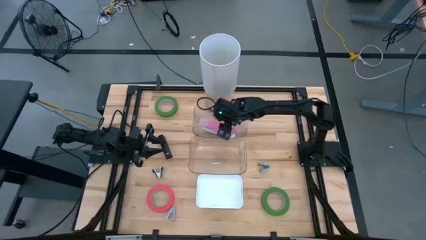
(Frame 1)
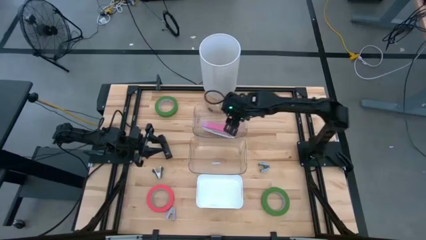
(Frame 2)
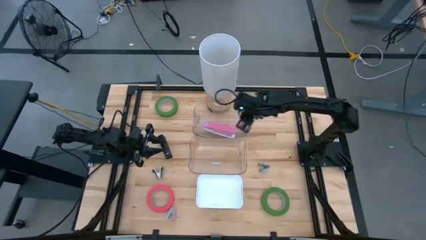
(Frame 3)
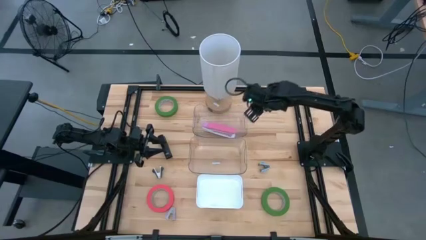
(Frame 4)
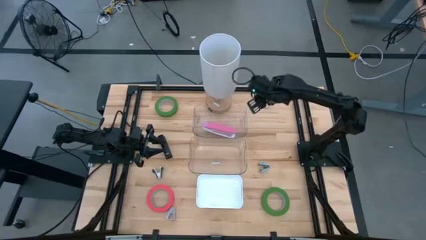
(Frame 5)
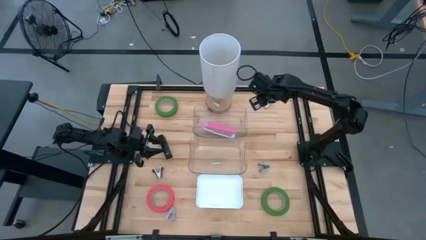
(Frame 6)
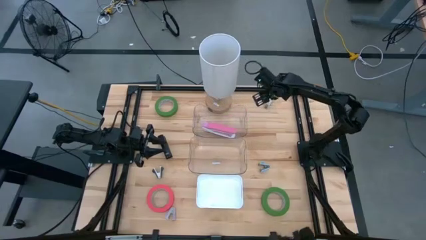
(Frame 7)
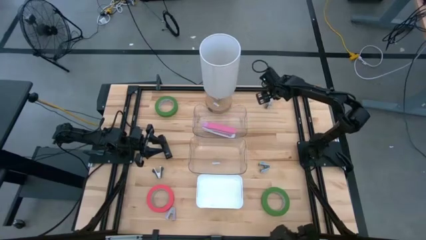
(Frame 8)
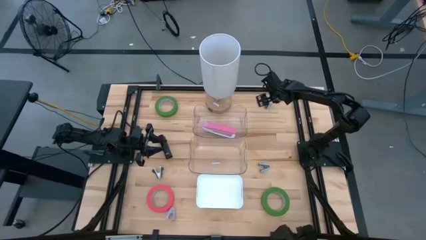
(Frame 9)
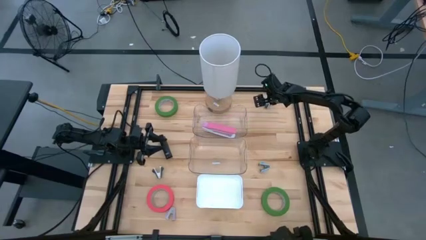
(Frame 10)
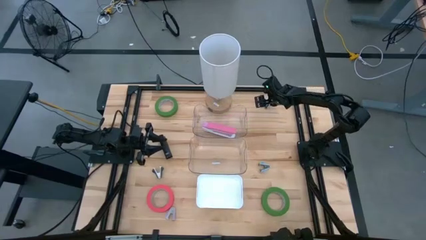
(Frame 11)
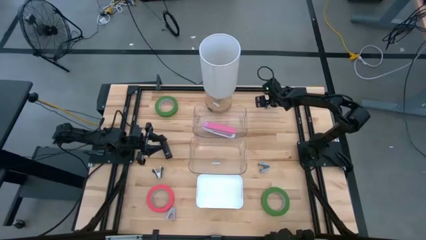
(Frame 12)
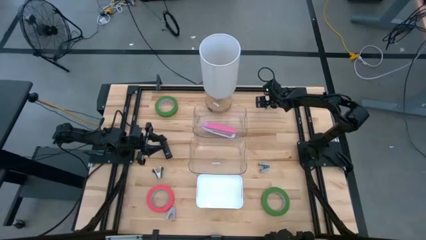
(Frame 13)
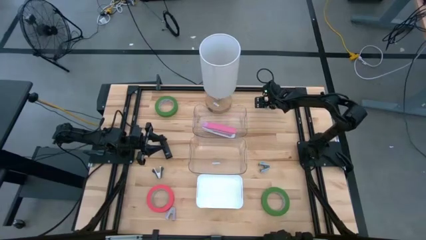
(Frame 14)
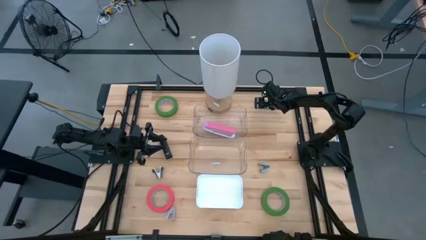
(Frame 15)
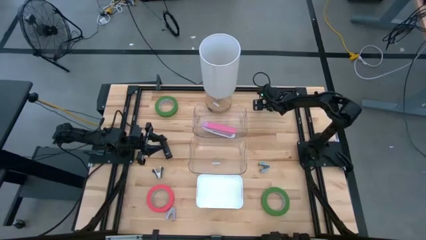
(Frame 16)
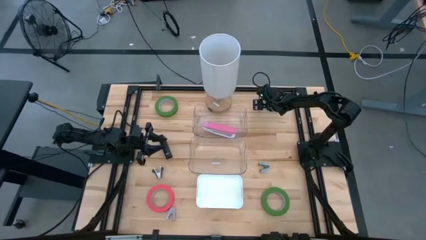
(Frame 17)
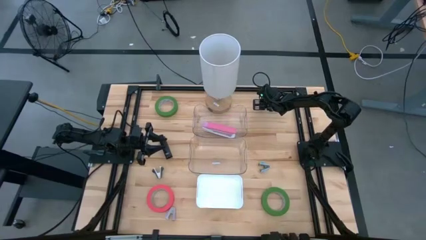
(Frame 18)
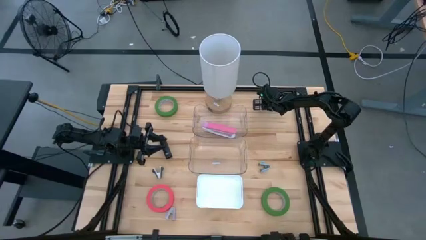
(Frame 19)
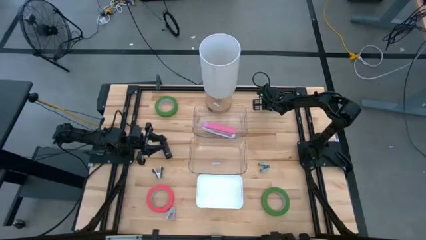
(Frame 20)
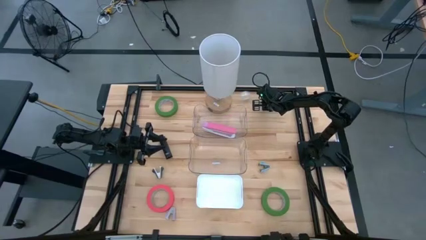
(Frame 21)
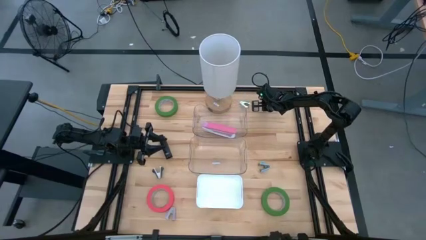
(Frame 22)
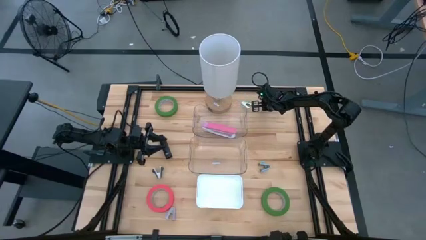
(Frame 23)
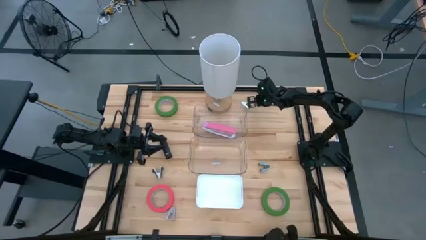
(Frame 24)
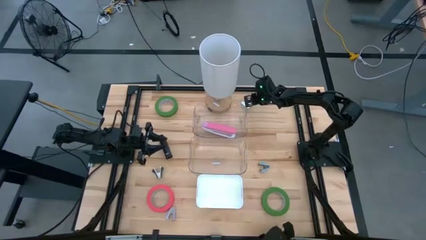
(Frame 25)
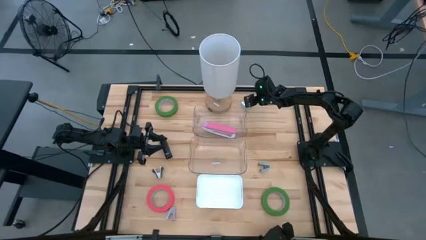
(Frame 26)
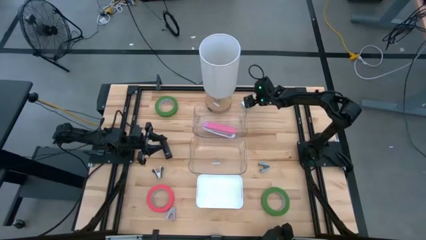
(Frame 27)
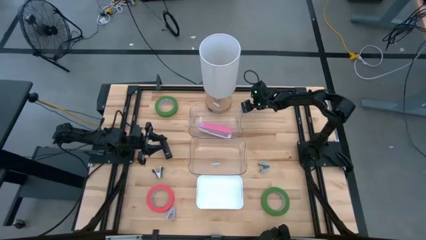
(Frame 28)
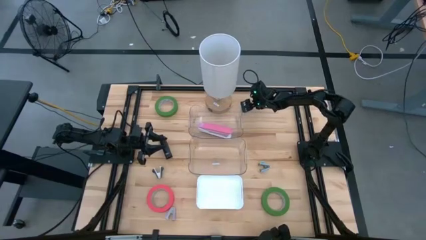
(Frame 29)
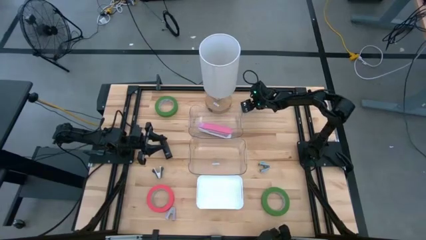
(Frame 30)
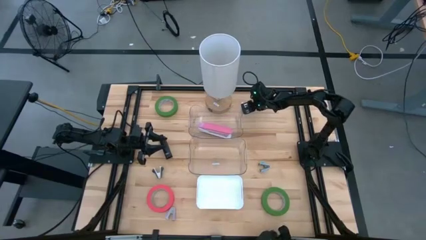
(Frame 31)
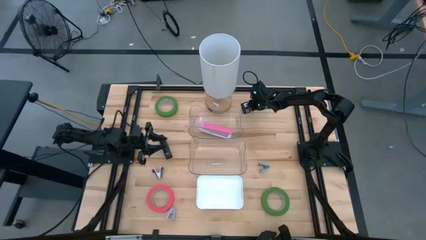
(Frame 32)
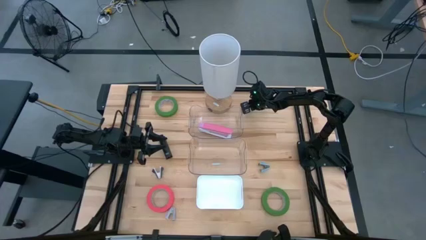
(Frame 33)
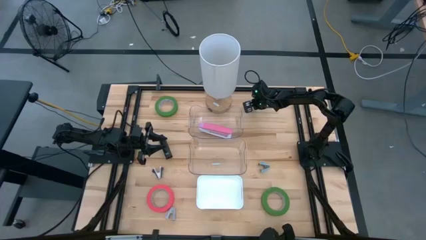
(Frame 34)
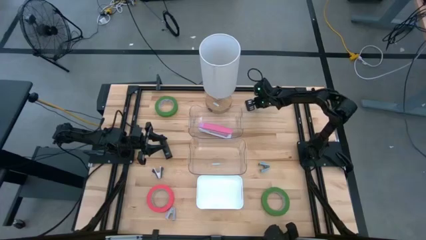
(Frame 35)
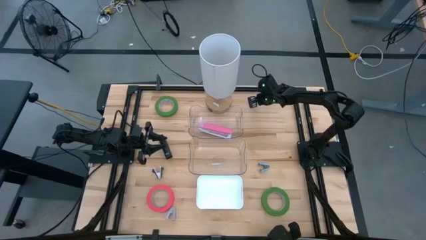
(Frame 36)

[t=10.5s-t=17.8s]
Task: Pick and place Stapler, Stapler remover, tape
Put the light blue staple remover into the white bin

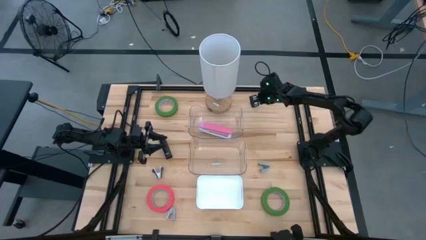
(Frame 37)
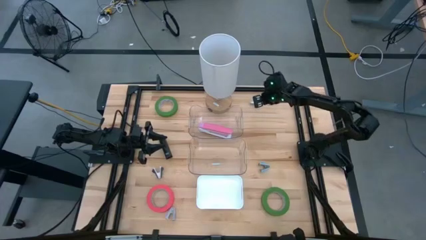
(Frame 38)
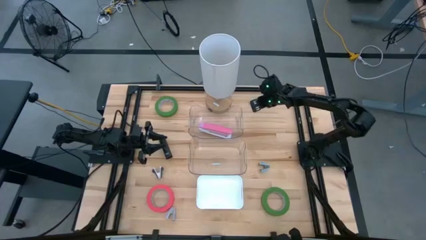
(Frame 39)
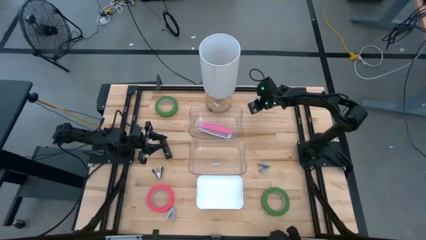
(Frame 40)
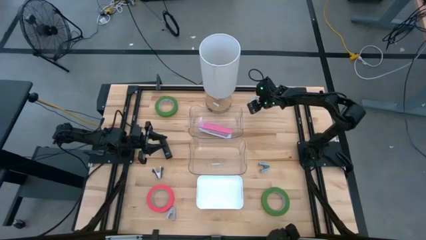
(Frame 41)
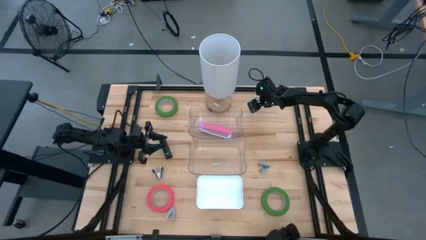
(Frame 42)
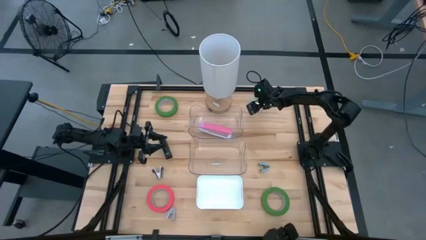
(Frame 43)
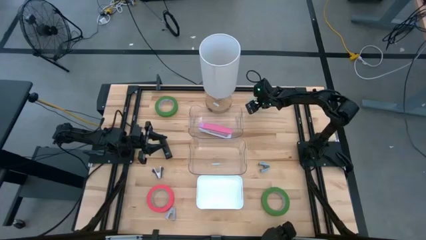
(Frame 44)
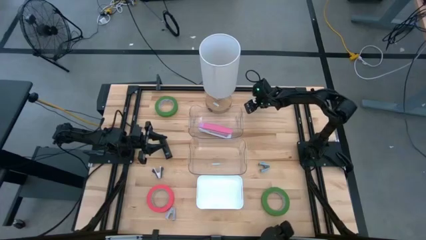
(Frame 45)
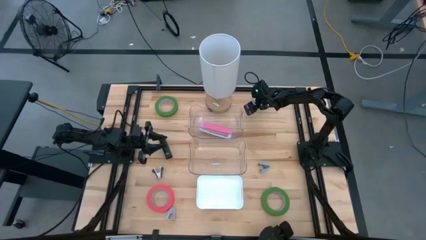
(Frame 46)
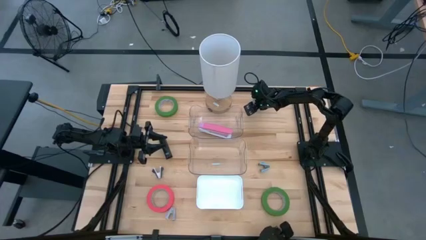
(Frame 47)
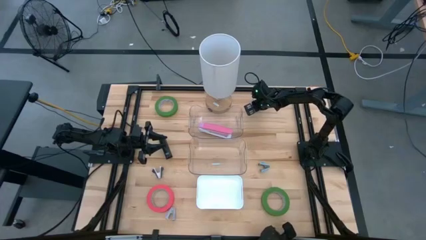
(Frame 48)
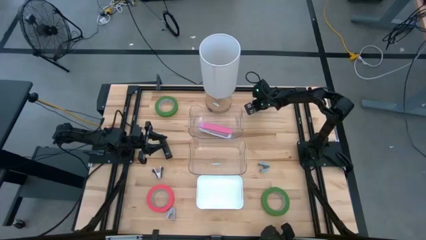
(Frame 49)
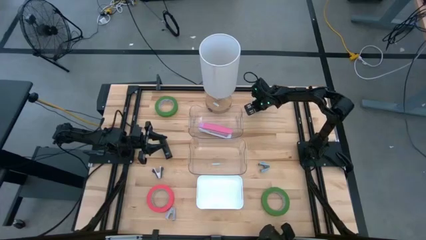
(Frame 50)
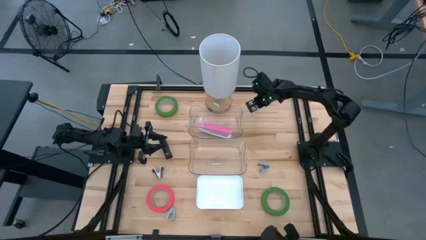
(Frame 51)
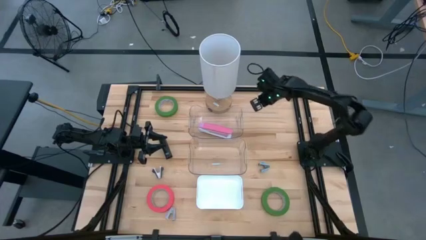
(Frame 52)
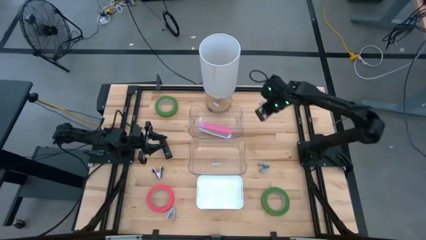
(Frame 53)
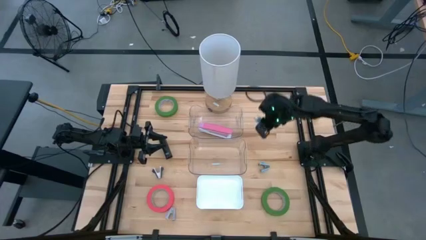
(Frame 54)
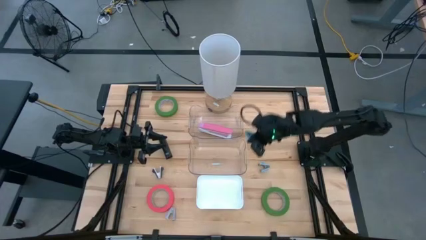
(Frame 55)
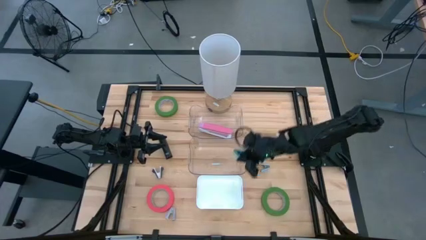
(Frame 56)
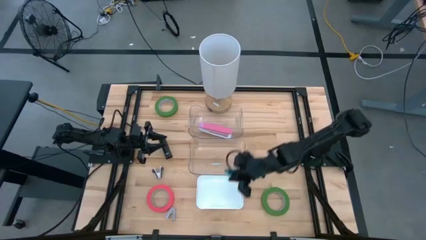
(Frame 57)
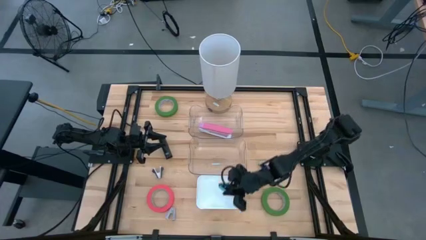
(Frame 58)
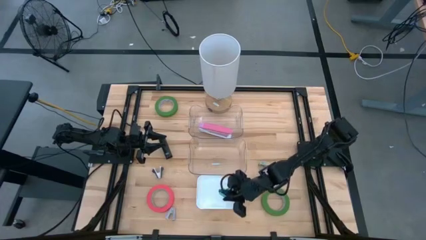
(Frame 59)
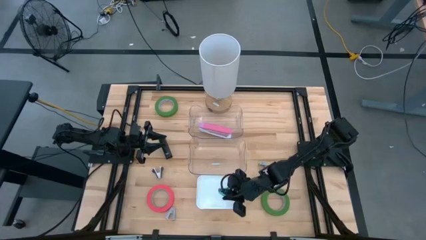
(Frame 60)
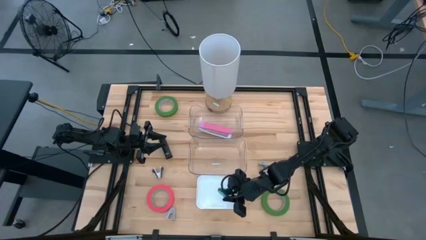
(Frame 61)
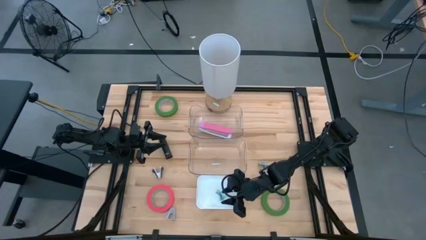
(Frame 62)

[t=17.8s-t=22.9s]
Put the light blue staple remover into the white bin

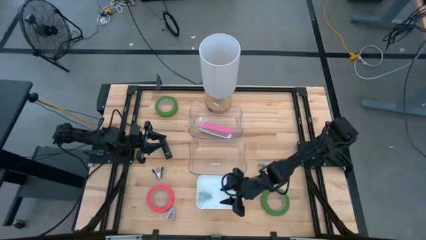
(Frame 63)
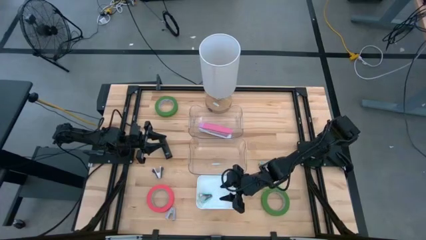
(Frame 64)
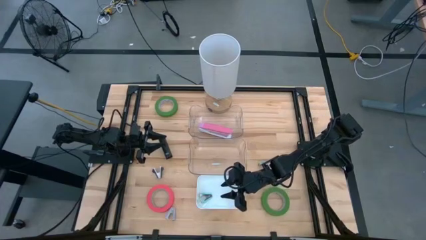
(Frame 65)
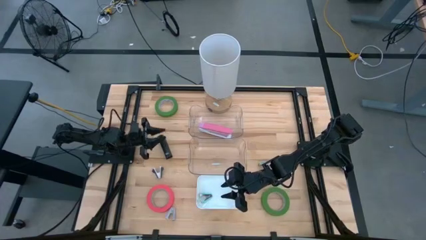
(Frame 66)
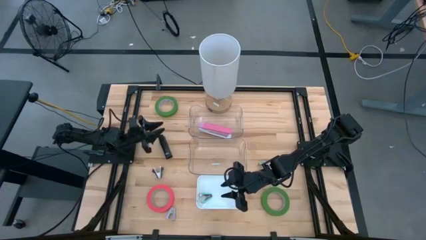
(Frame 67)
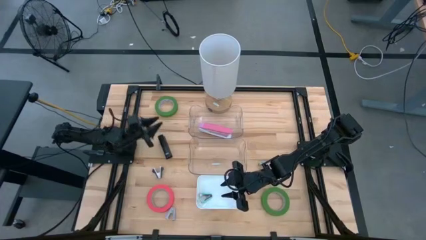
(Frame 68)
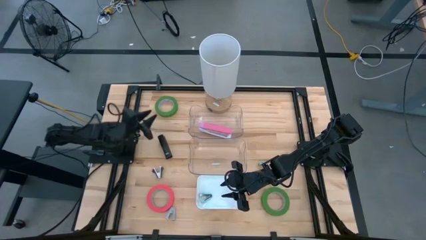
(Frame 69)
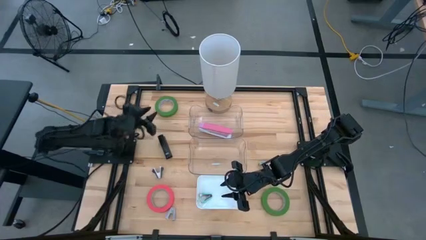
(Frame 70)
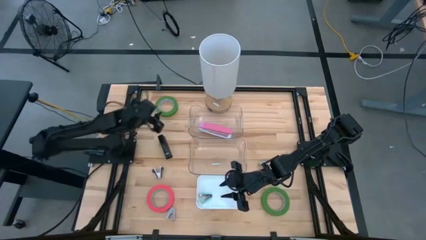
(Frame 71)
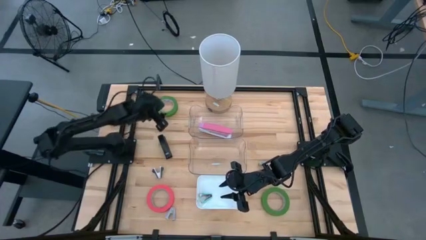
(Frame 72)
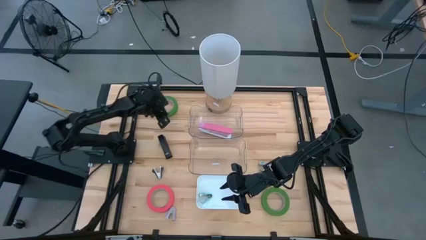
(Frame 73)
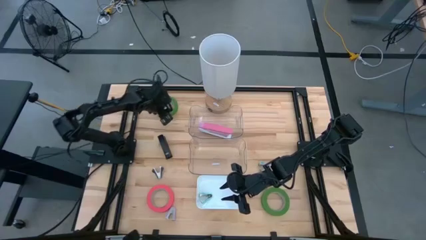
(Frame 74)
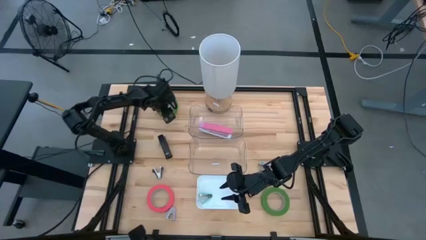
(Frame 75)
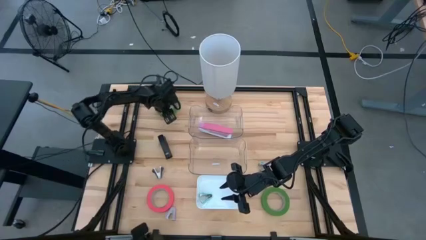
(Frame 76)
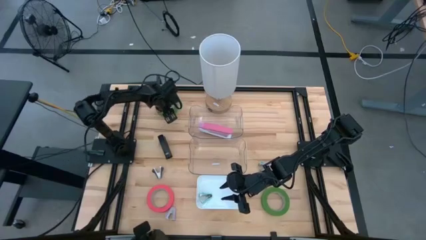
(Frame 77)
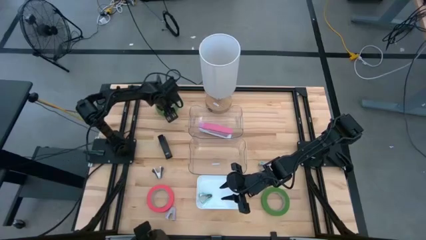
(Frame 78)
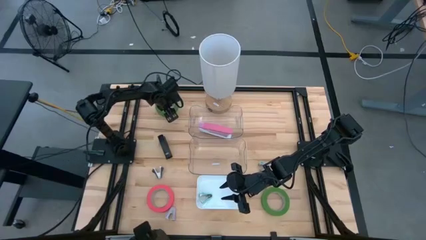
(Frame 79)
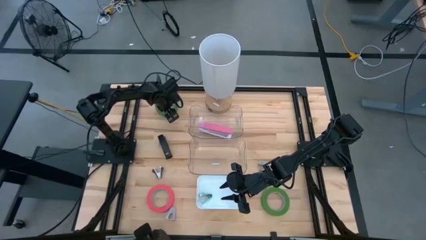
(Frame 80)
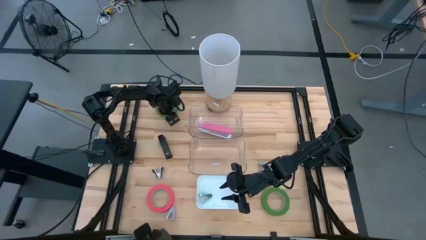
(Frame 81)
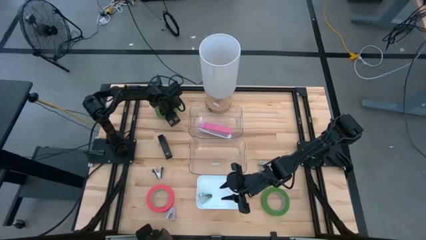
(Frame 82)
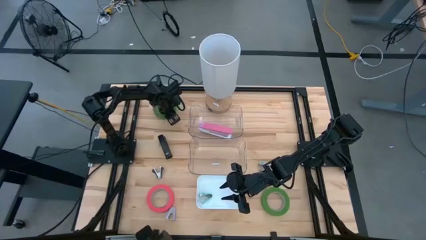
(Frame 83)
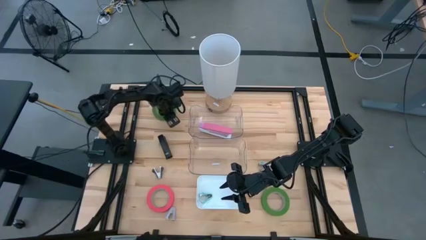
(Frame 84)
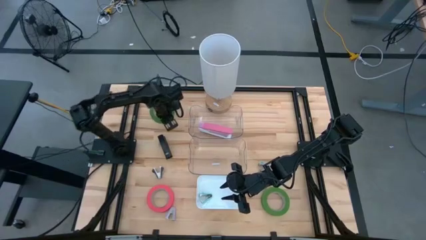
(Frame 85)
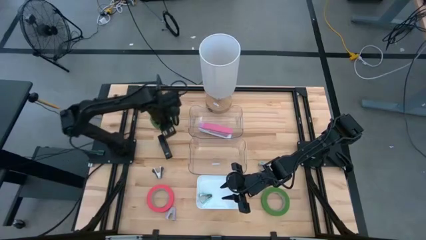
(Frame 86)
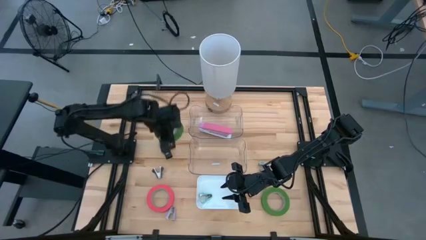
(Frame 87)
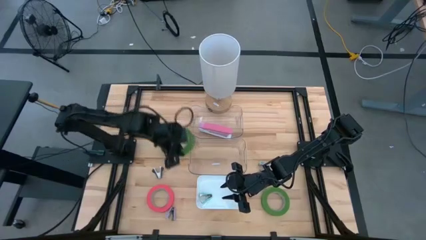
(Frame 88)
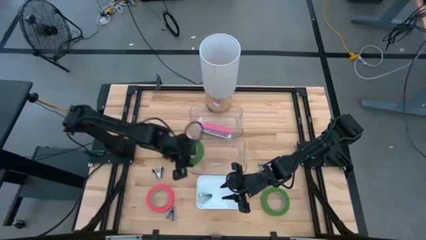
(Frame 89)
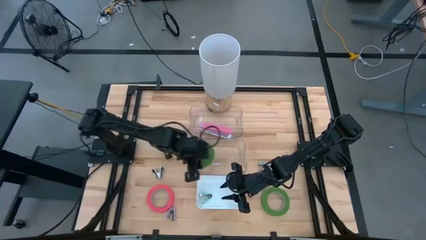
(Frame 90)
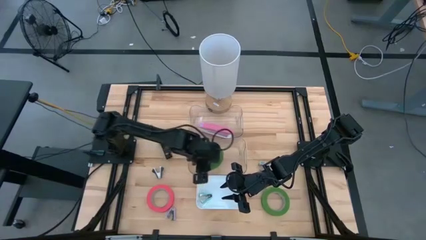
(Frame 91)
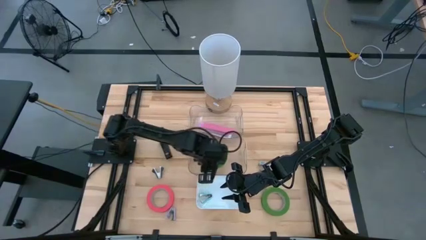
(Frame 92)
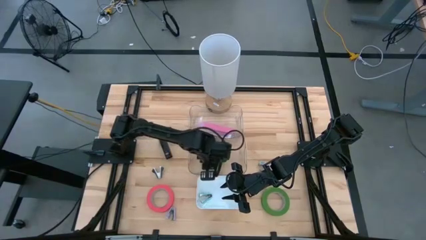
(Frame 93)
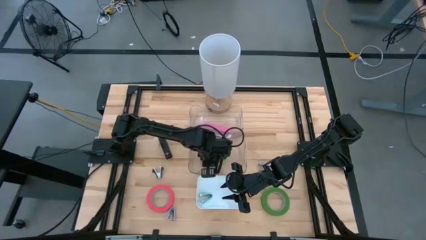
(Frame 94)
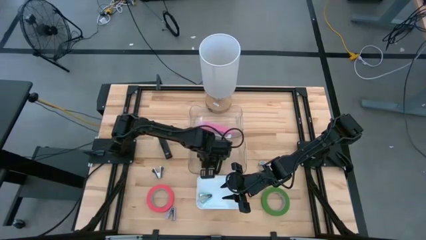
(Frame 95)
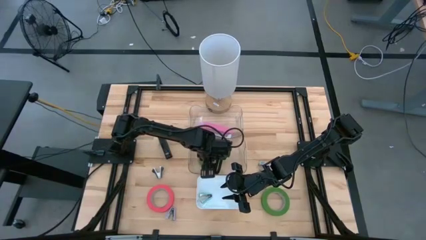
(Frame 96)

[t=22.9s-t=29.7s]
Put the top green tape into the bottom transparent bin
